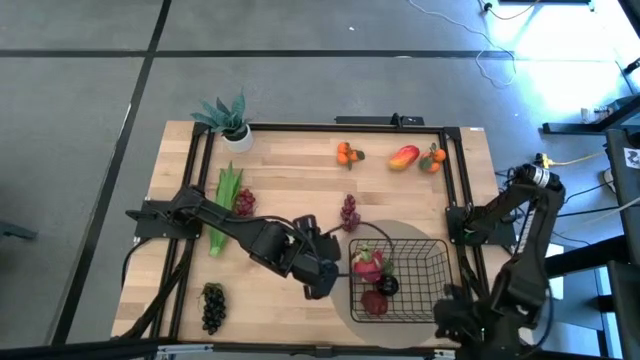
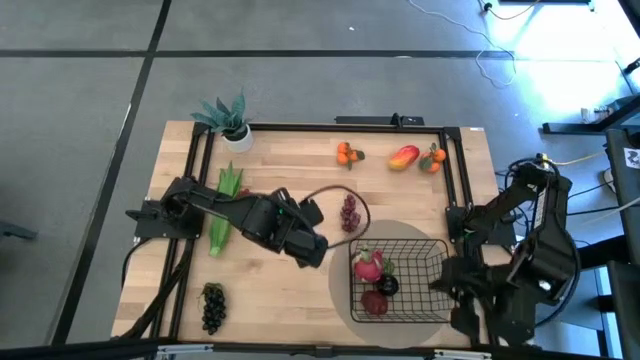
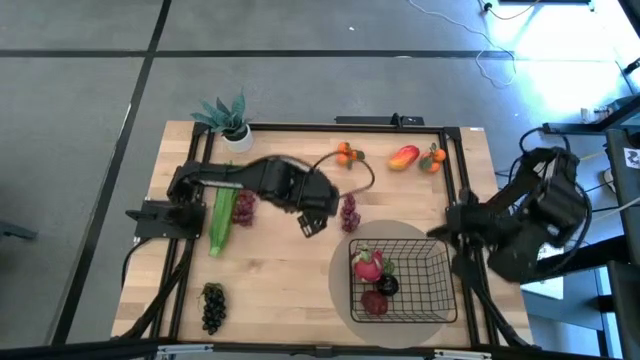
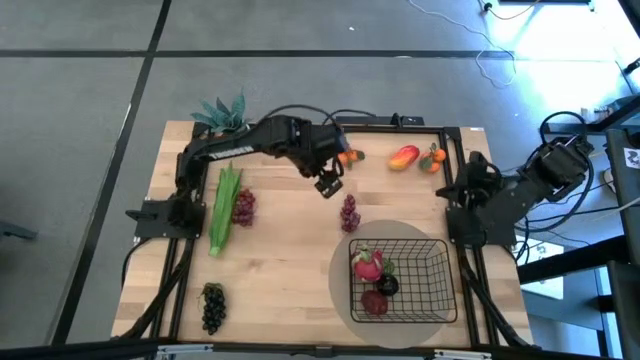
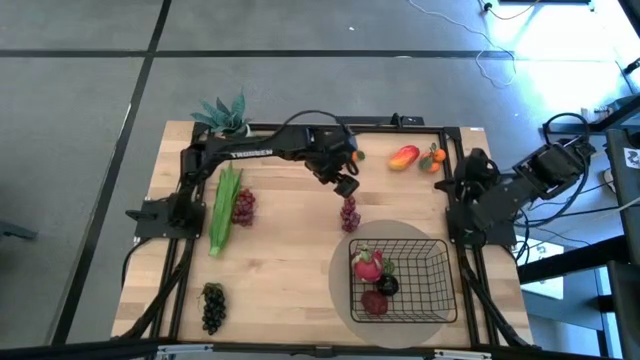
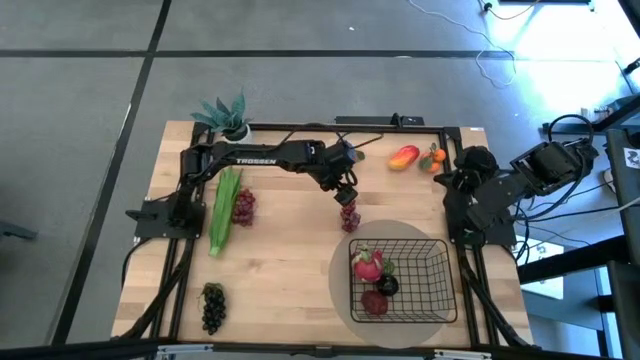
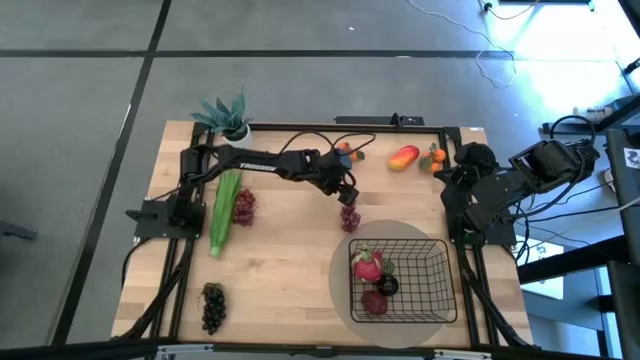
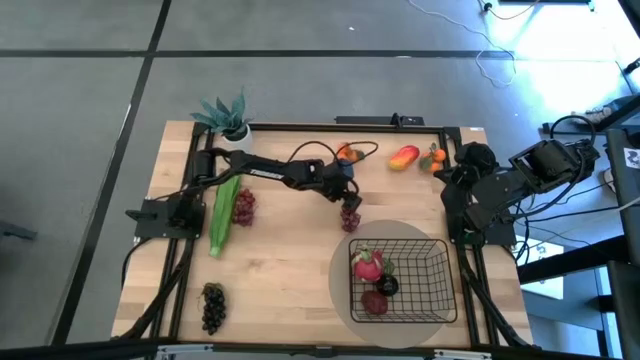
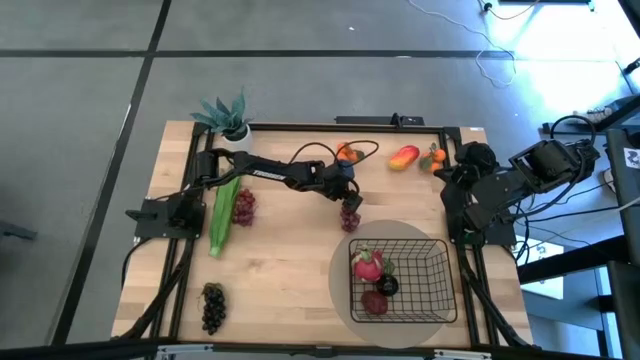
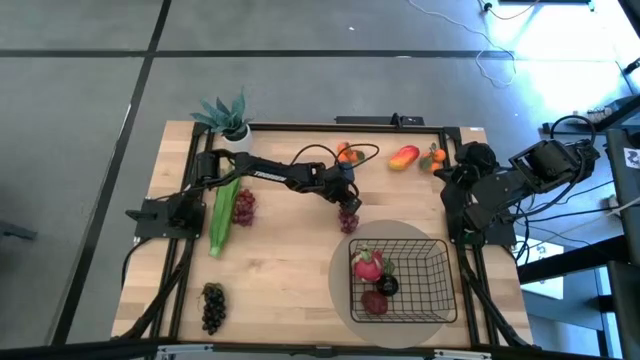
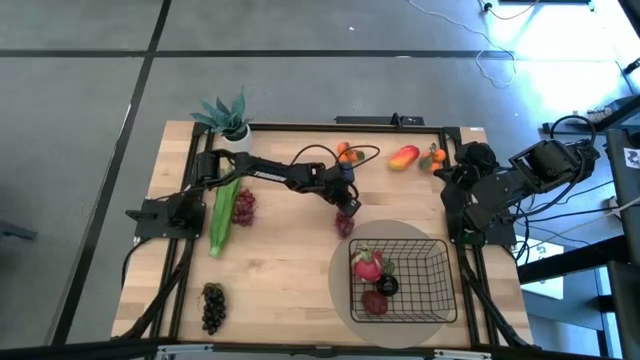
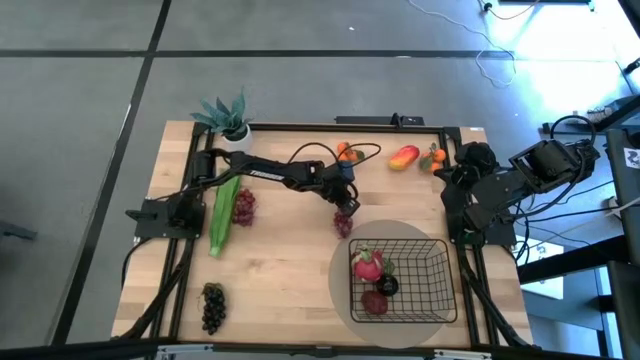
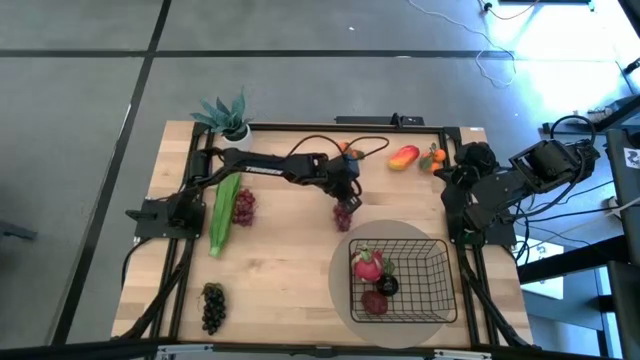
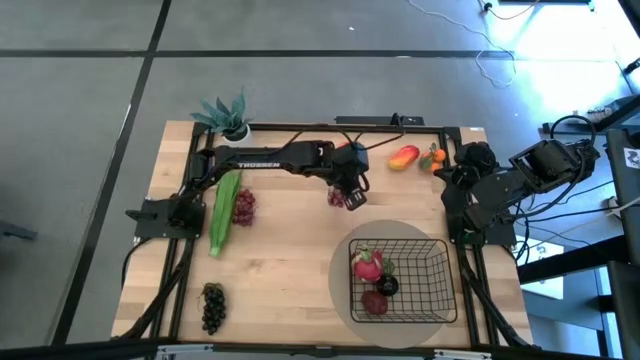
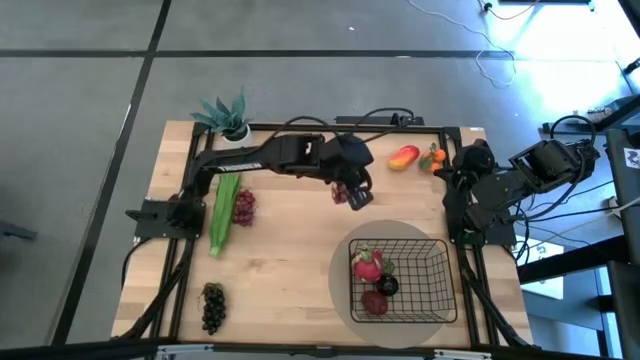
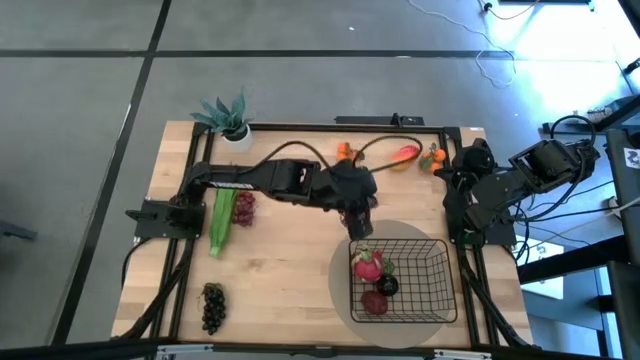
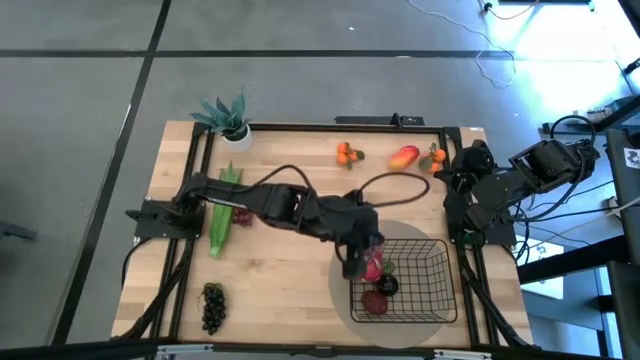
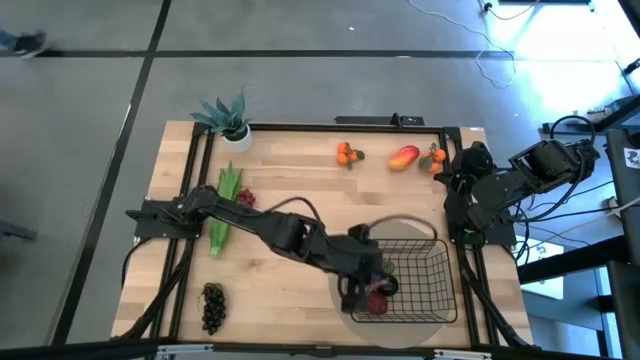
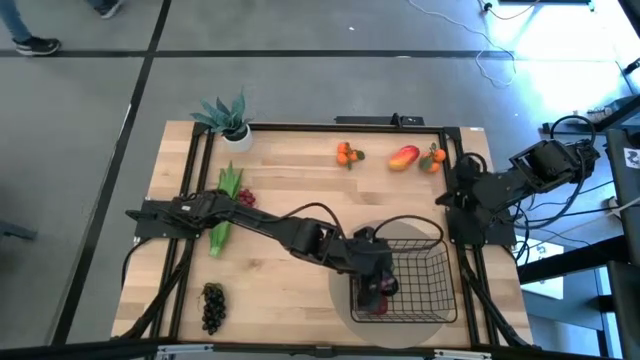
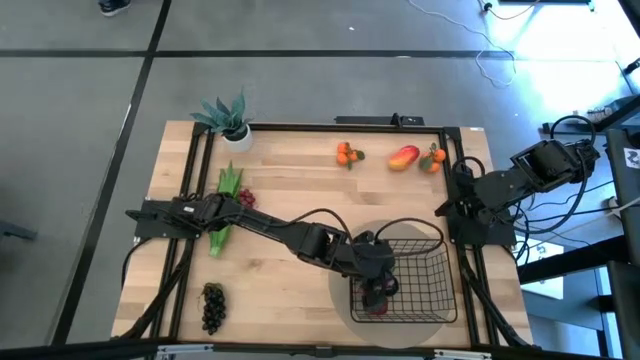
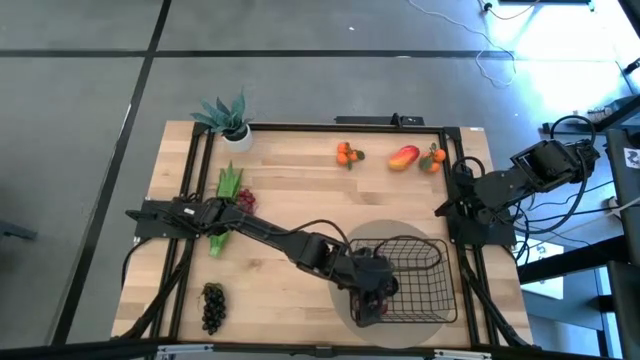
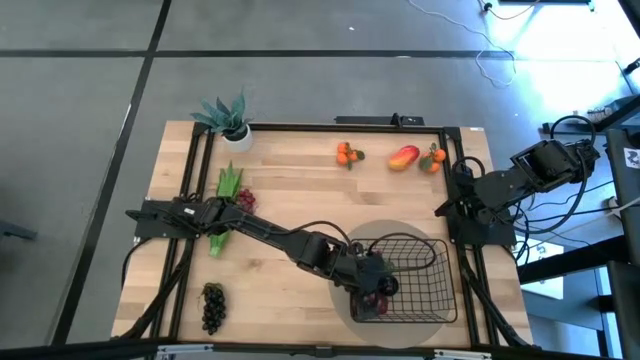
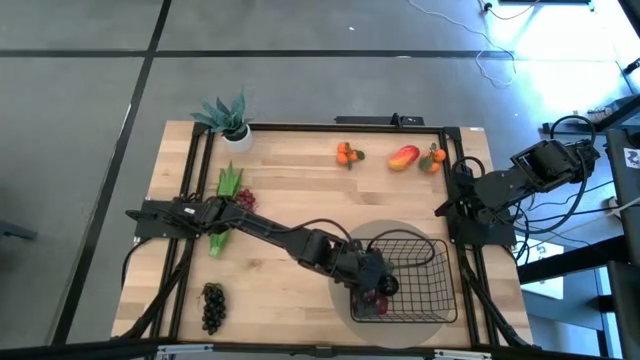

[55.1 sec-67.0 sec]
Task: Build produce basket
Put the right red grapes into the black wire basket

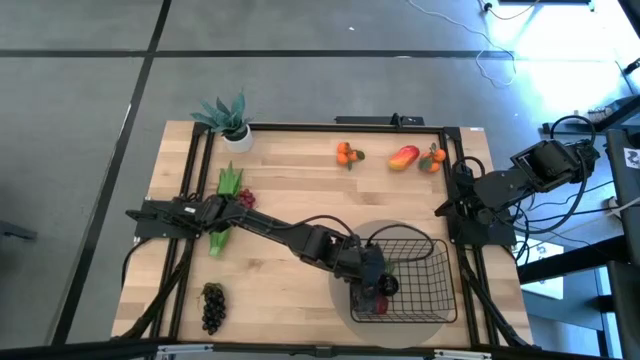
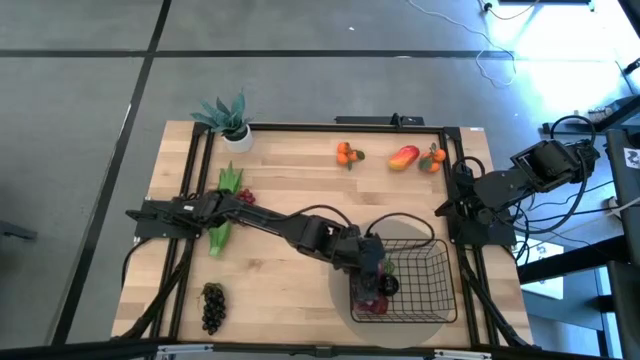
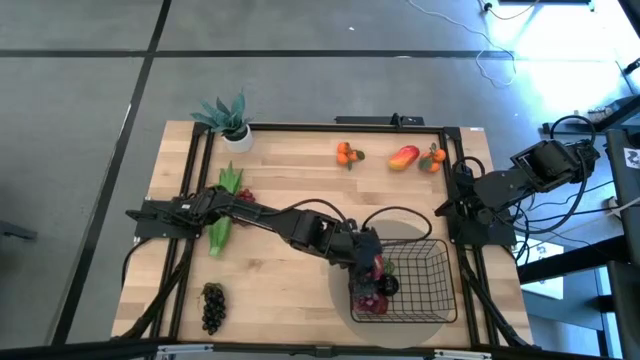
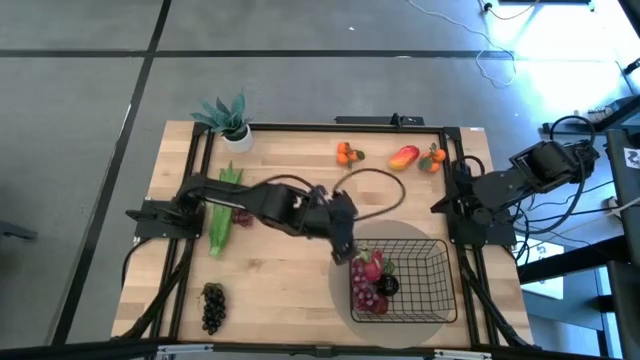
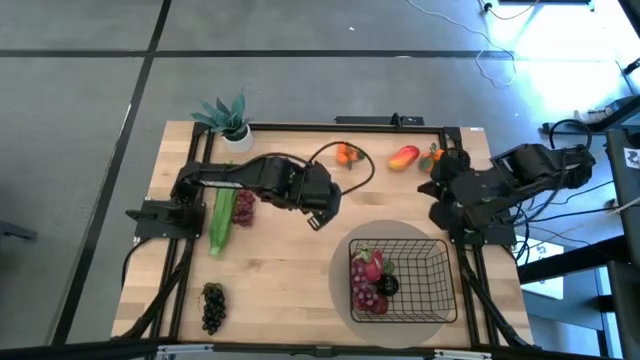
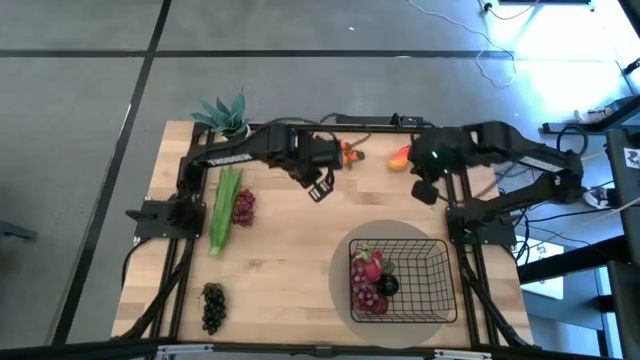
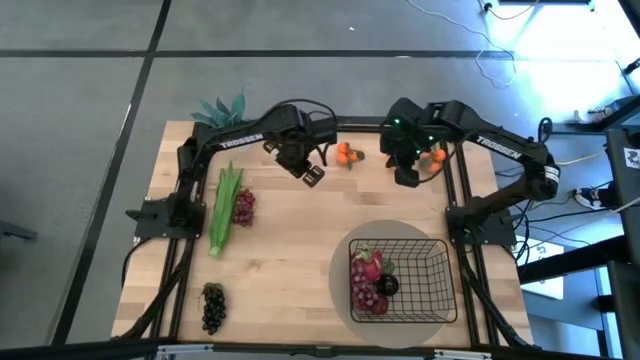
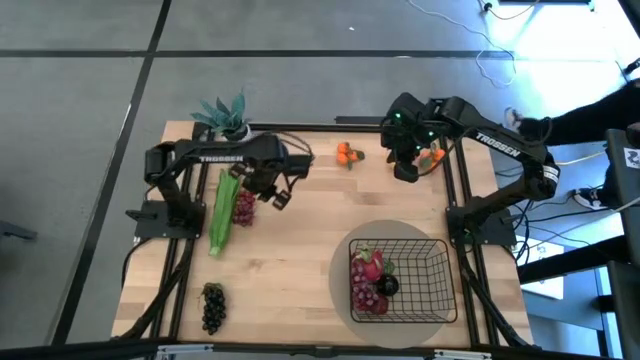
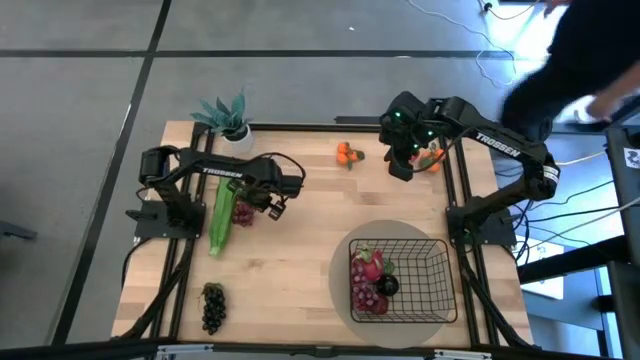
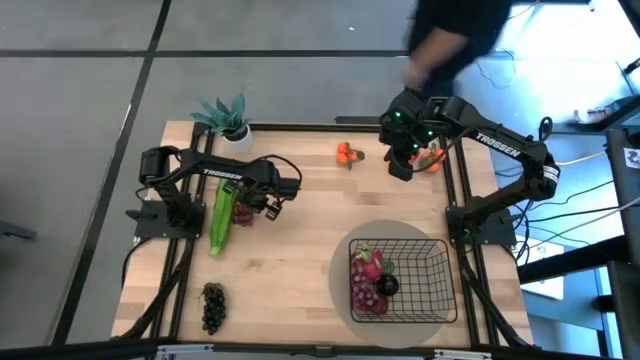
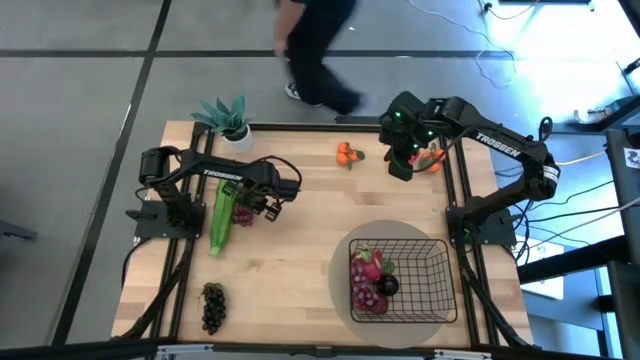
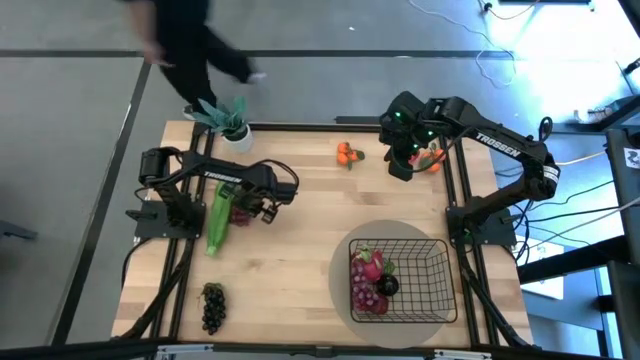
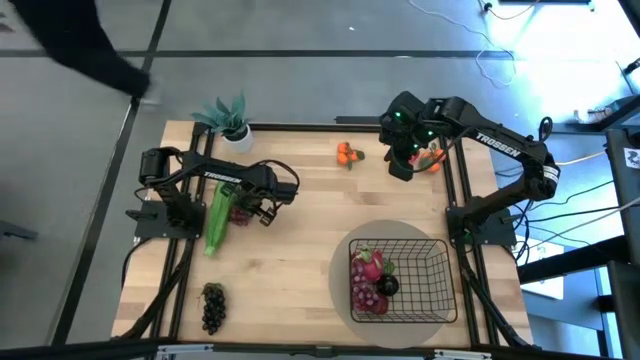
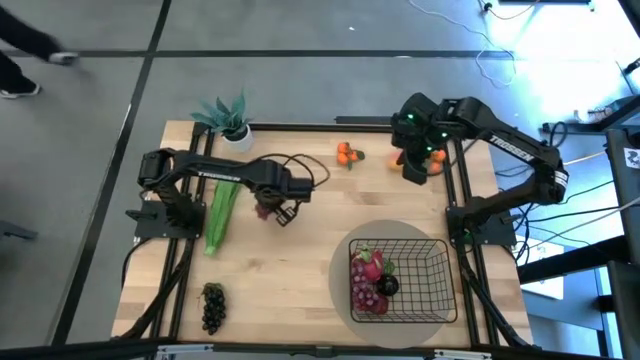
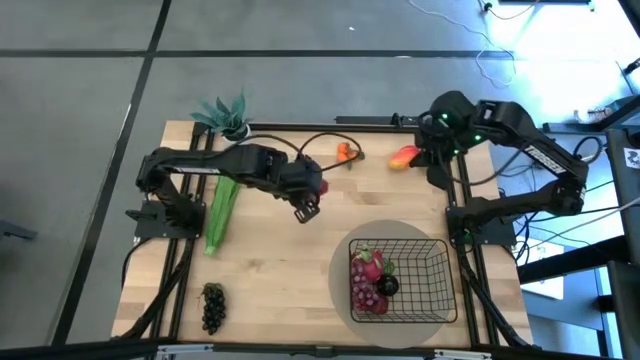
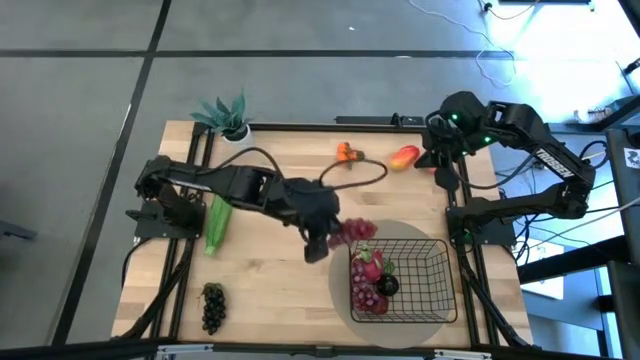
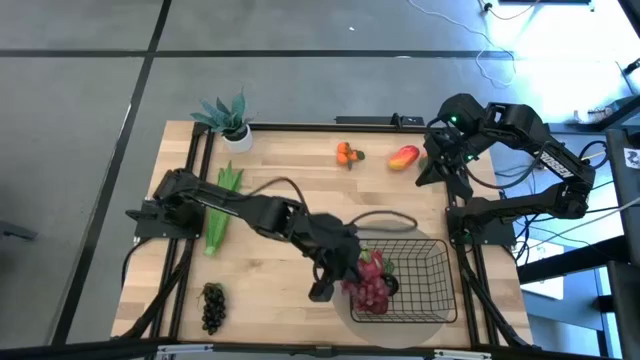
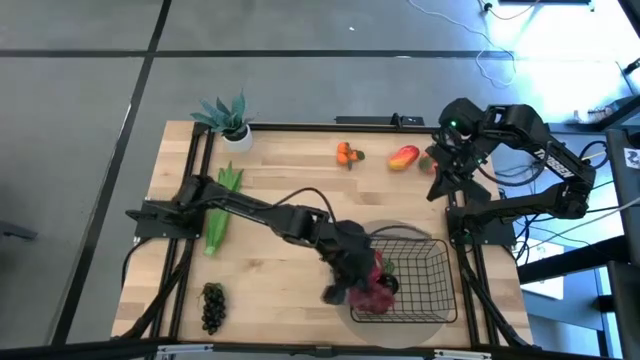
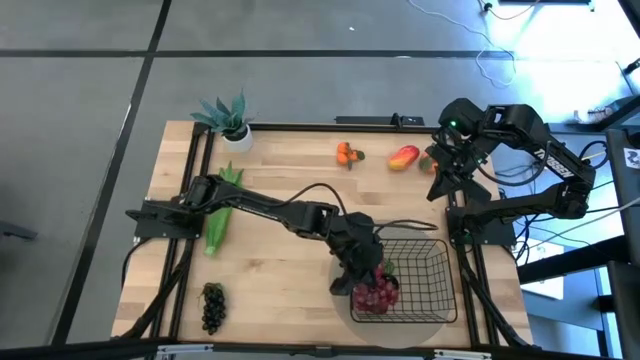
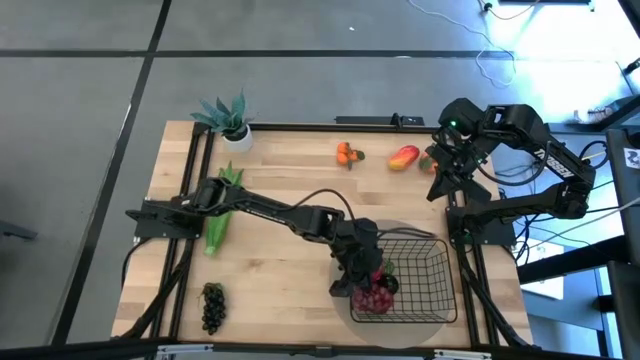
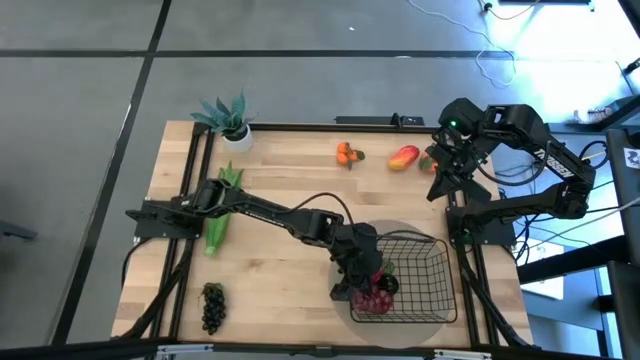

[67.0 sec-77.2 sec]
Put the red grapes into the black wire basket

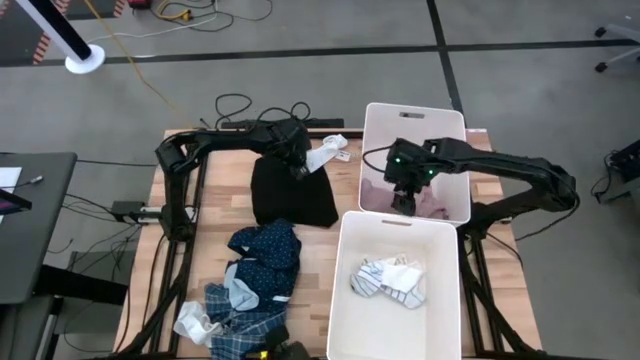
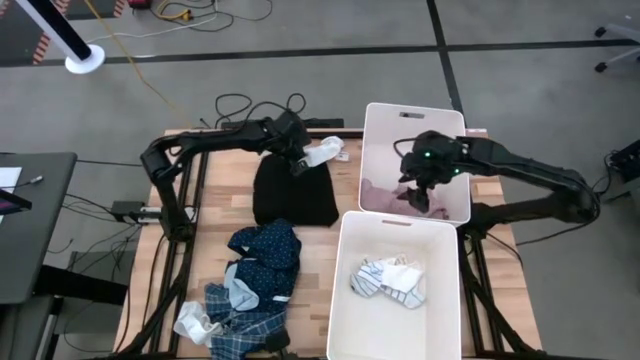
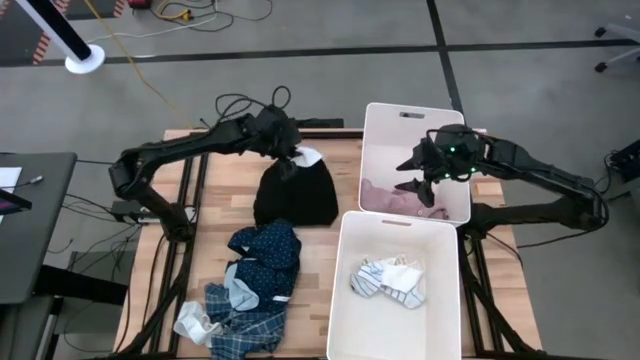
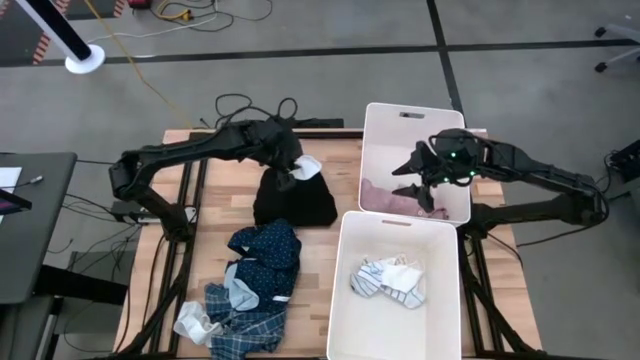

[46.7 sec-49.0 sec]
Task: Sort clothes
Put the top white sock into the bottom laundry bin
